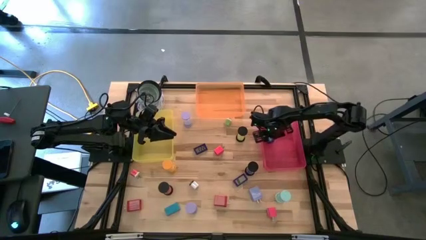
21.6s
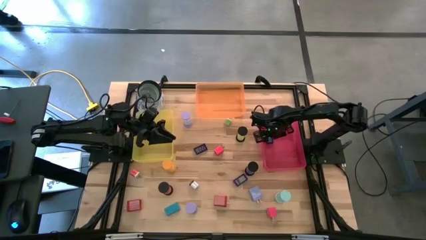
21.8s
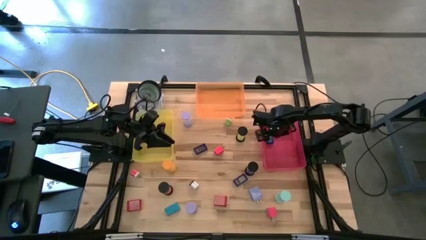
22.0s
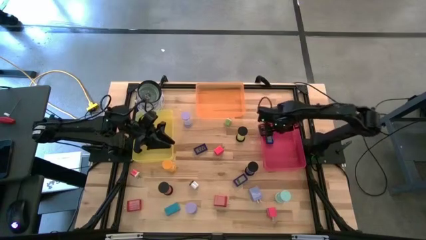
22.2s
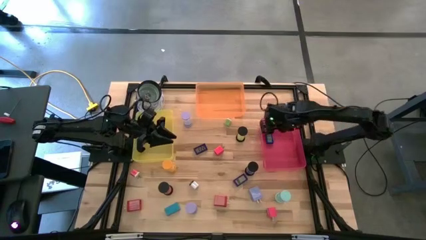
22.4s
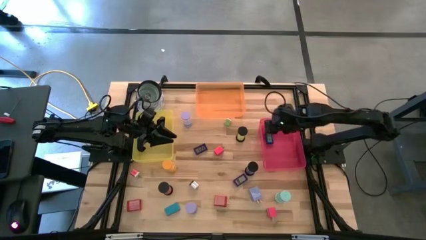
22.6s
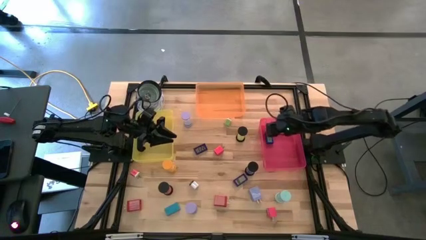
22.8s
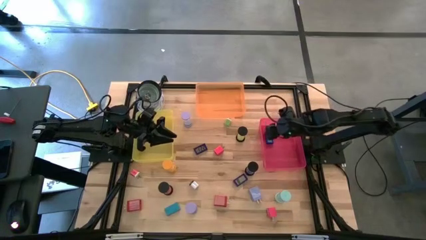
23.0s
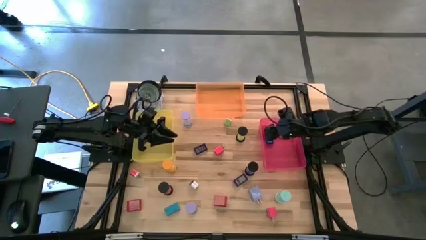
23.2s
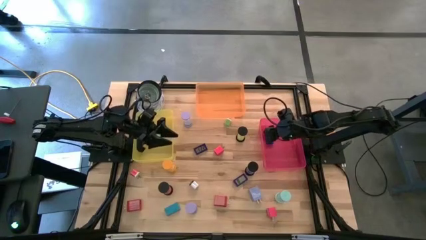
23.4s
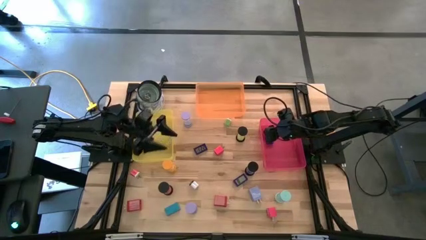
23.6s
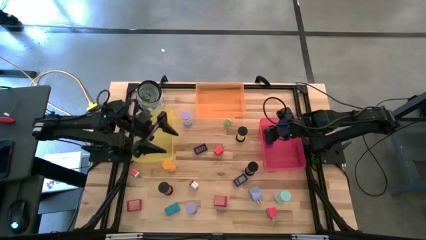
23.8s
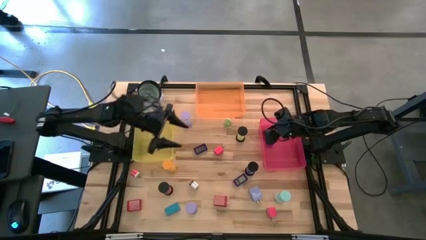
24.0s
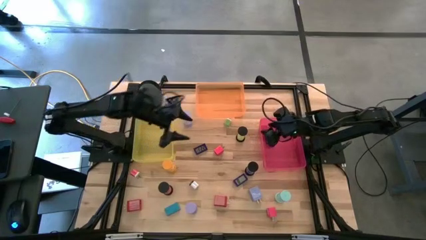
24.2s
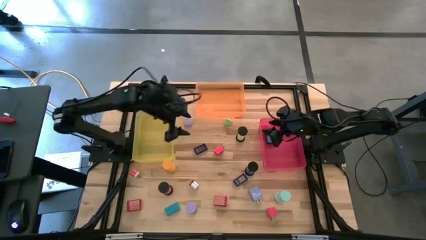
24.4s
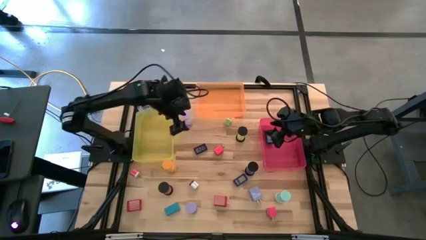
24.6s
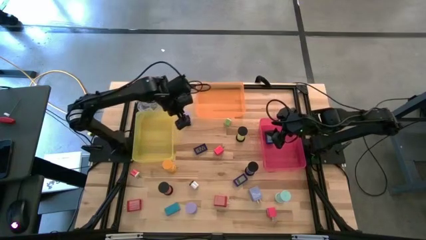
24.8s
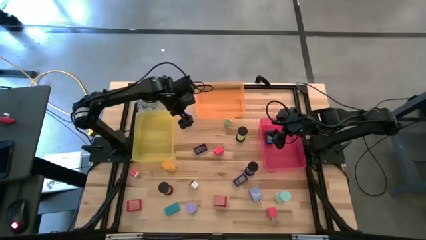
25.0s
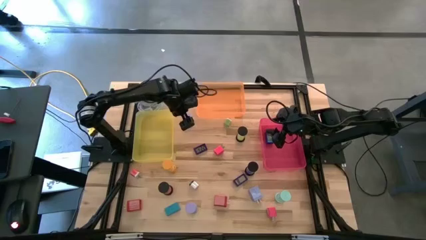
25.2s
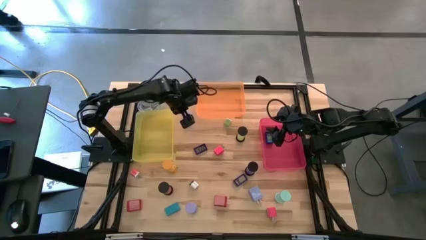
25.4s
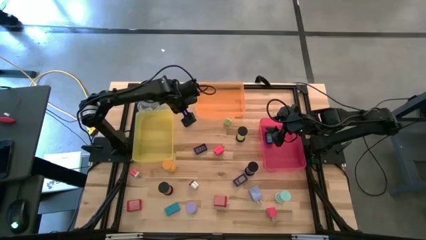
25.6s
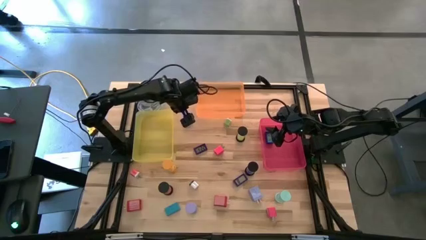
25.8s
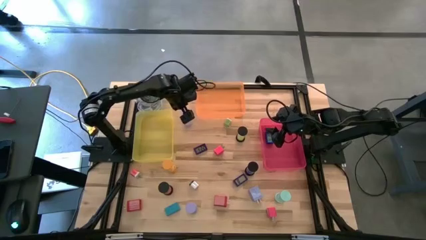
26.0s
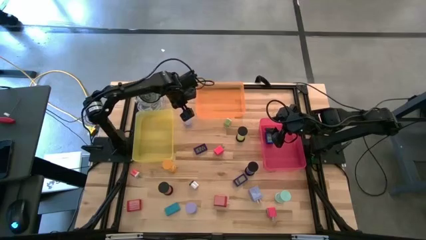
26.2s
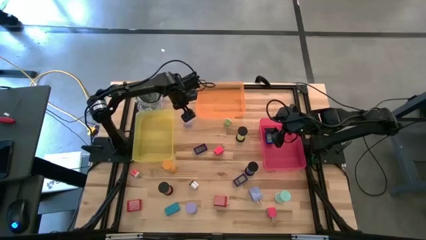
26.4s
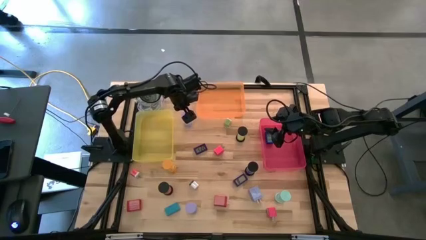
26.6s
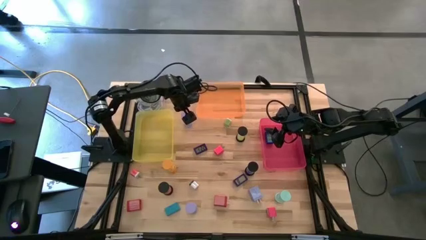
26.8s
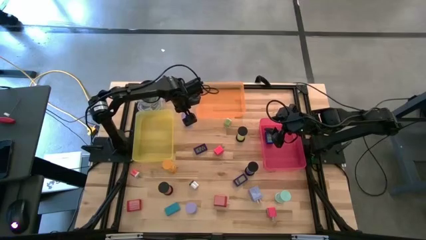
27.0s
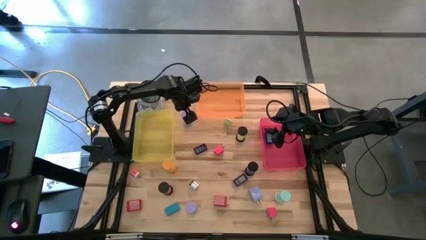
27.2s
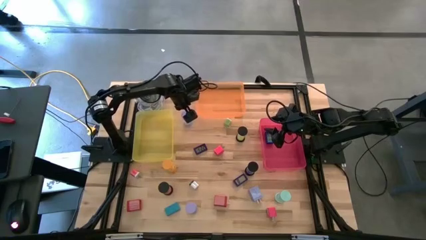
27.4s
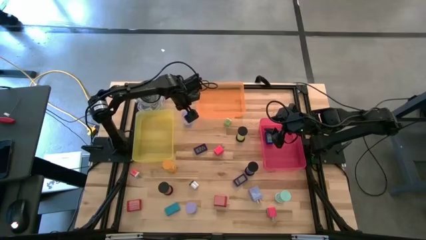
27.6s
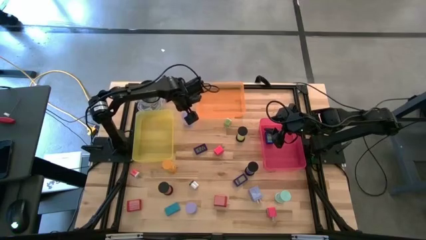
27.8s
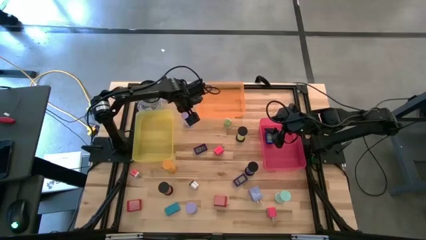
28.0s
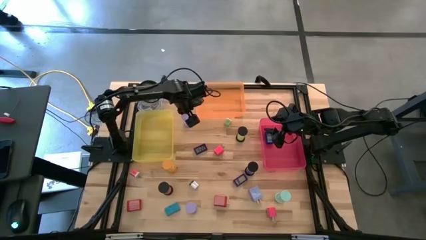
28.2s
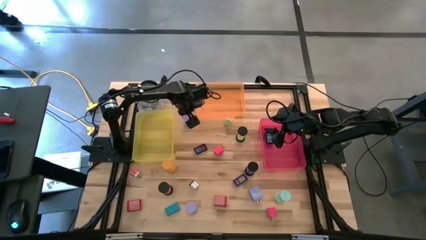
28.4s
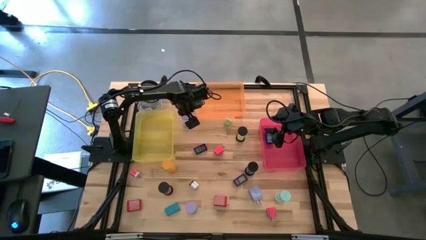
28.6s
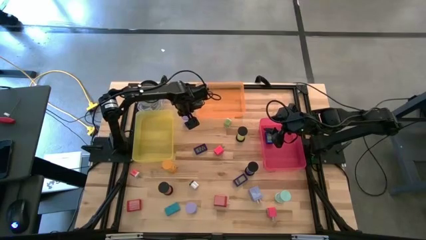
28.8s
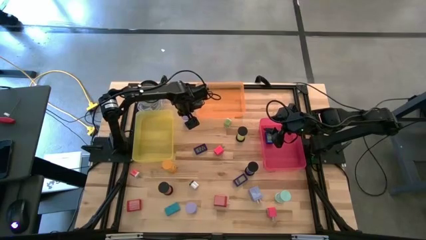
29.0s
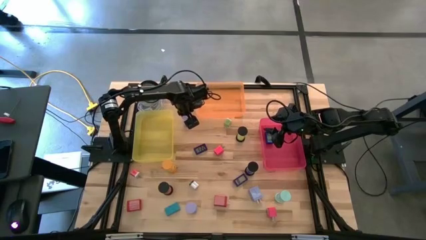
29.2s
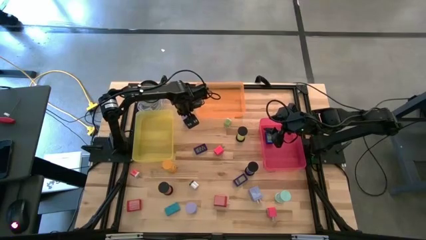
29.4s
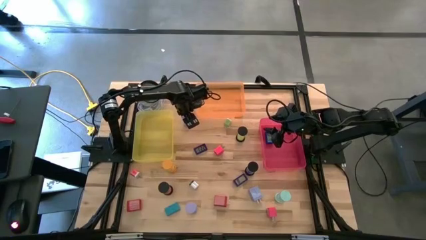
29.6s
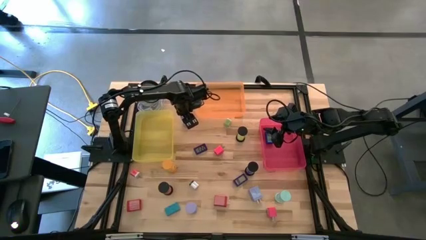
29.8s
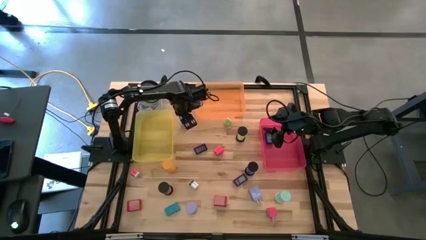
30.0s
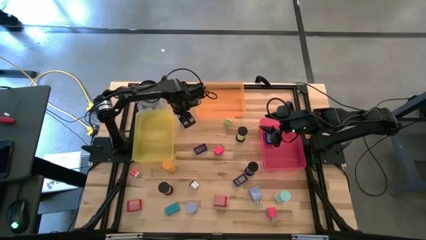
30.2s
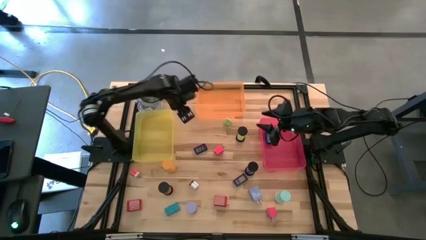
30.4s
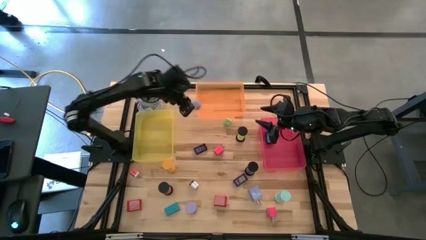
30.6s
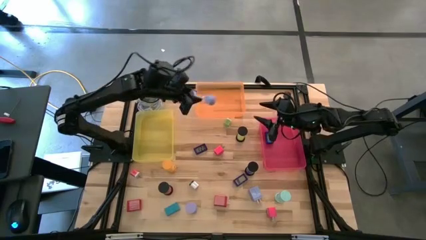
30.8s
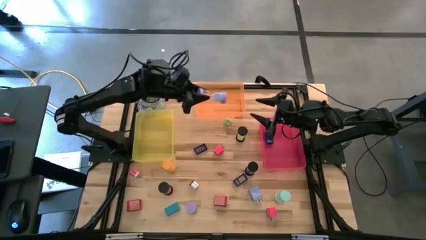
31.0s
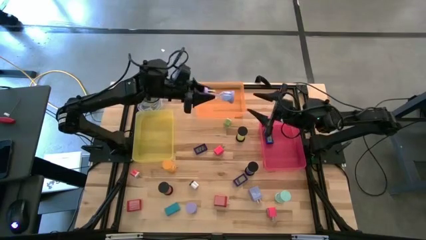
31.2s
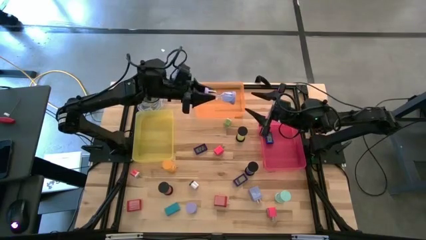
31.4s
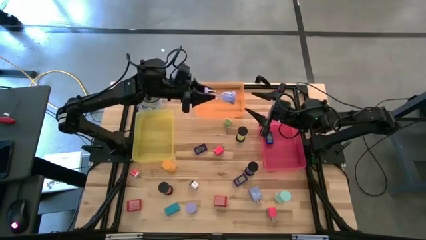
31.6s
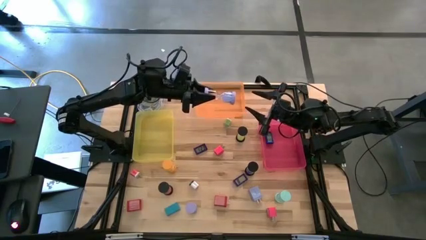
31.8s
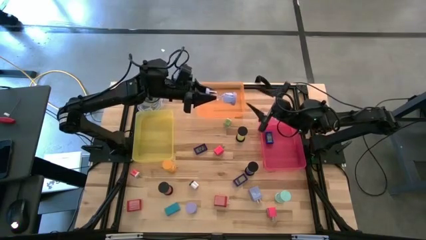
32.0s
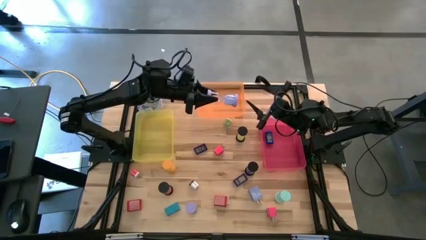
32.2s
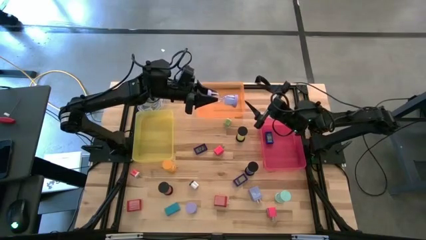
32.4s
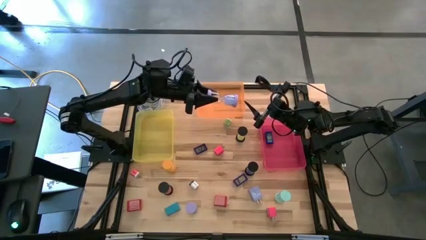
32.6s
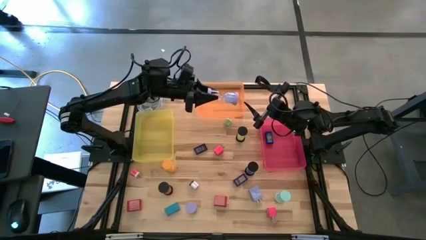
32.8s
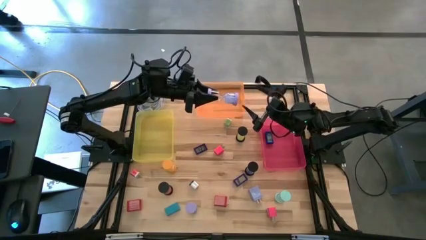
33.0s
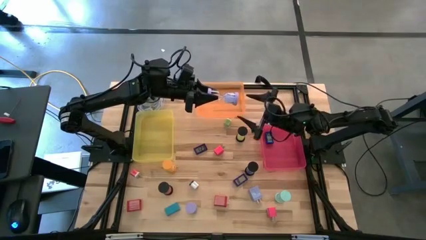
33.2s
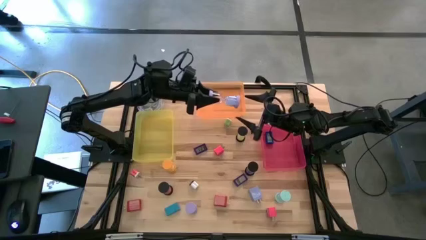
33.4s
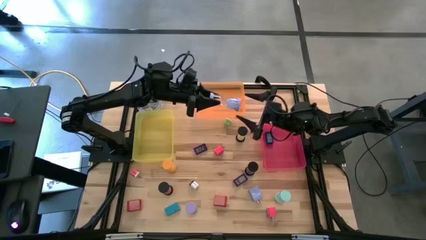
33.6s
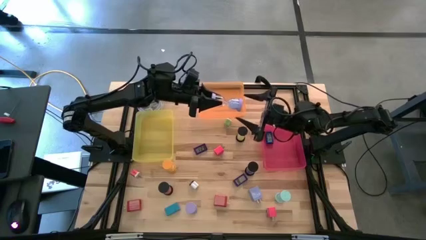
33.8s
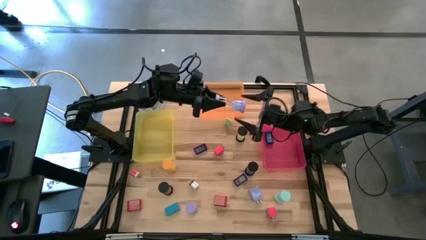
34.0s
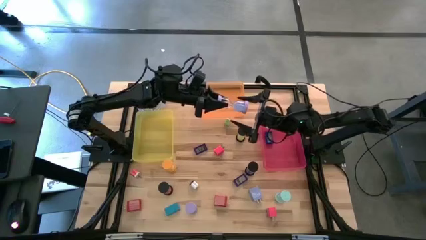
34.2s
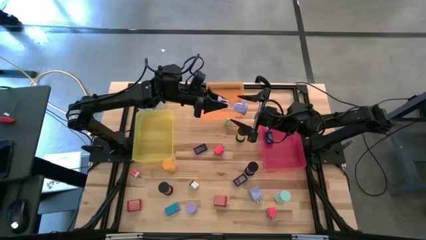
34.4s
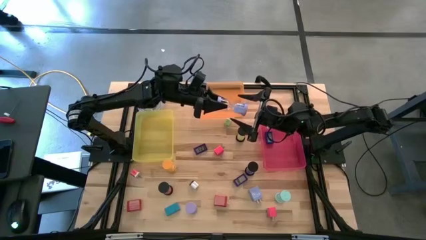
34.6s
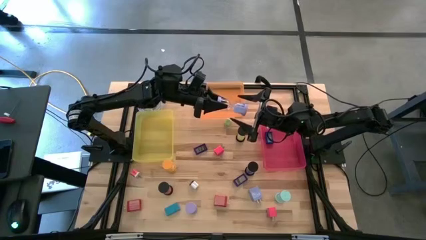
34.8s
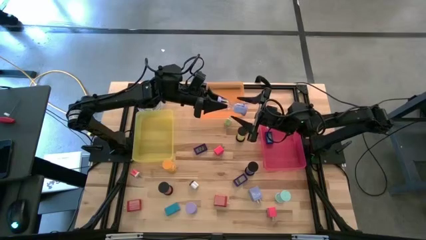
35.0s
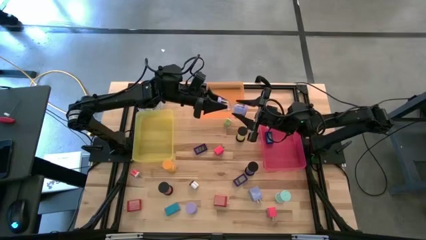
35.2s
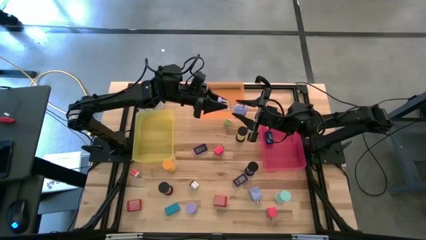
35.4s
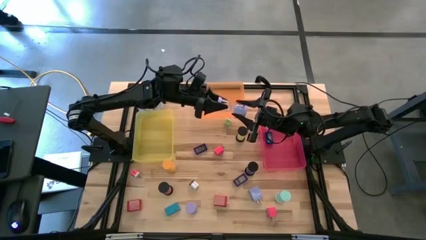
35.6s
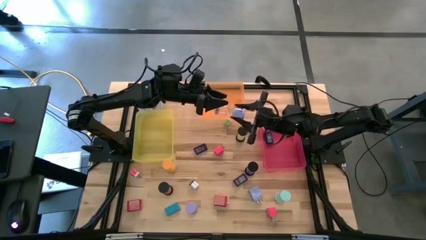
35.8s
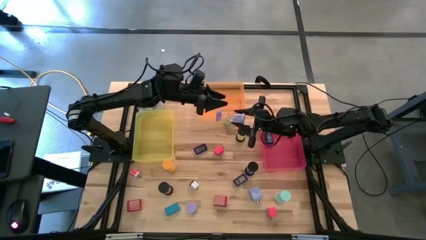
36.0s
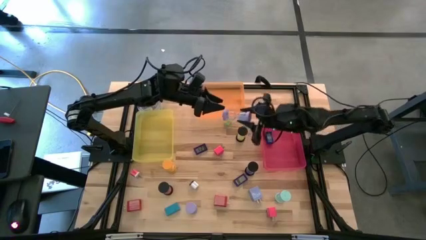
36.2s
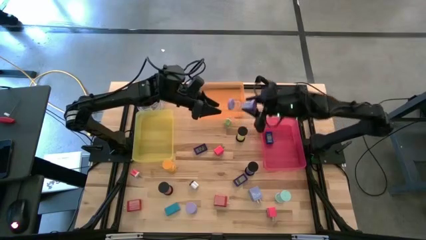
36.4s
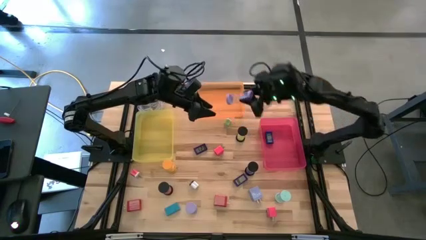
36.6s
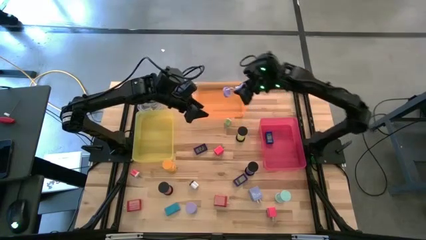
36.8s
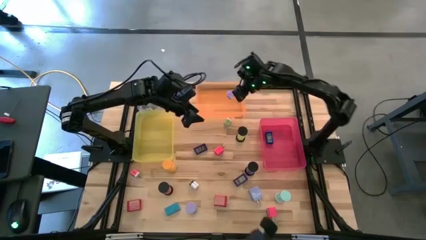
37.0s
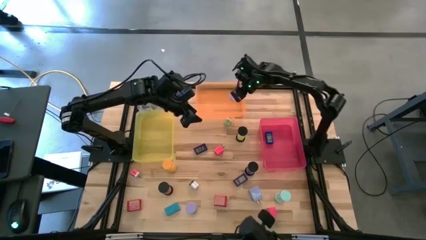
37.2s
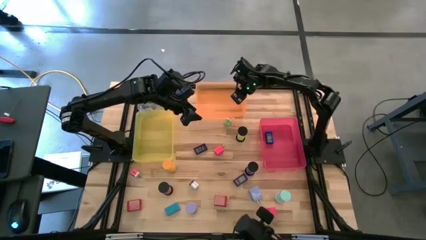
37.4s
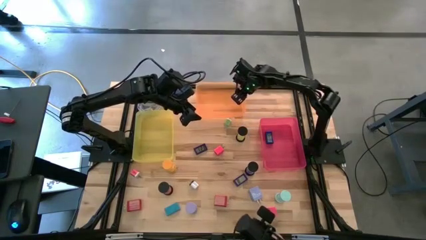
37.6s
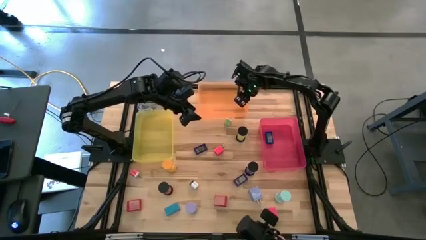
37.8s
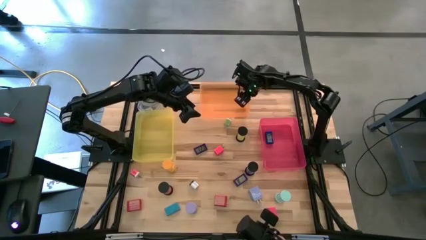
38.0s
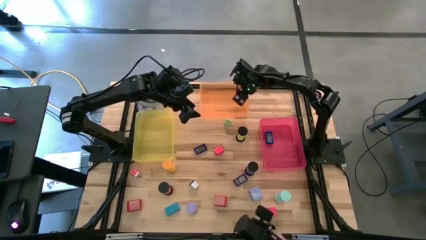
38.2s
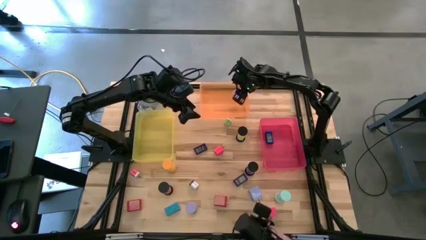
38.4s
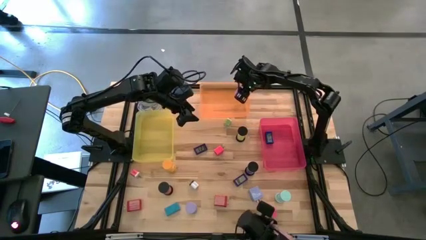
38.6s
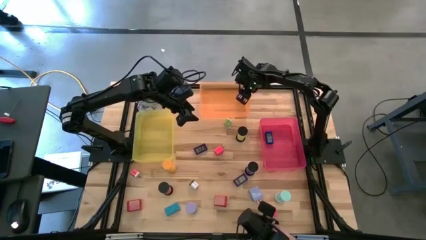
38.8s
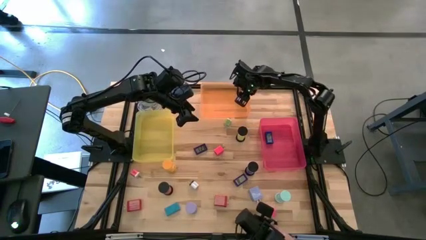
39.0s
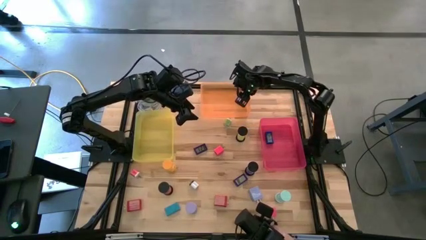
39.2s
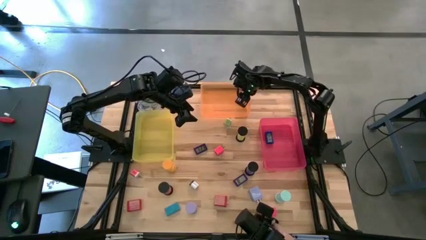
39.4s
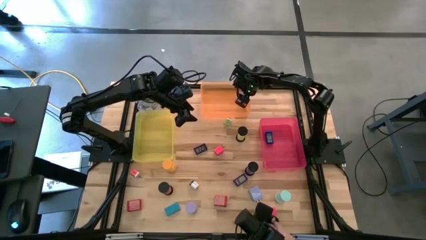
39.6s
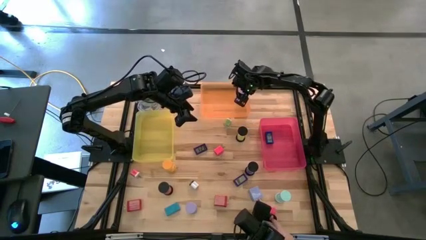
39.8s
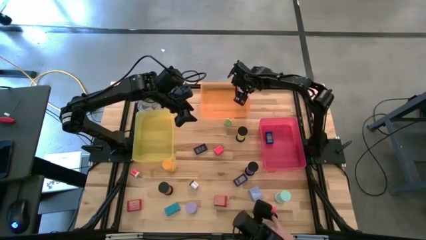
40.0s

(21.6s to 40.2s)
Task: Pick & Place Office items
Put the blue hourglass in the orange bin
